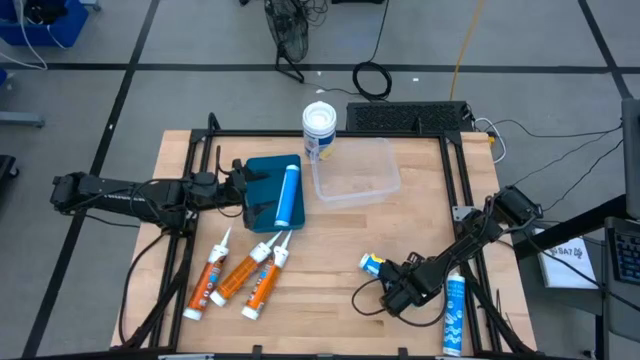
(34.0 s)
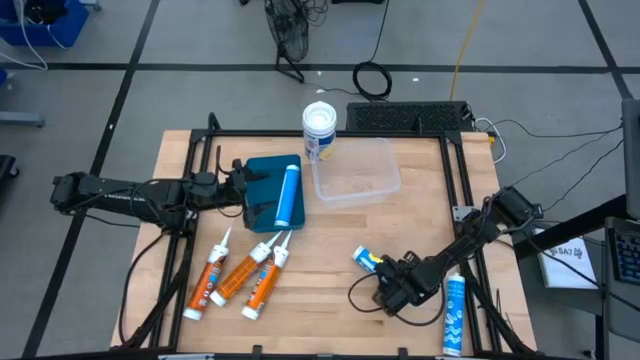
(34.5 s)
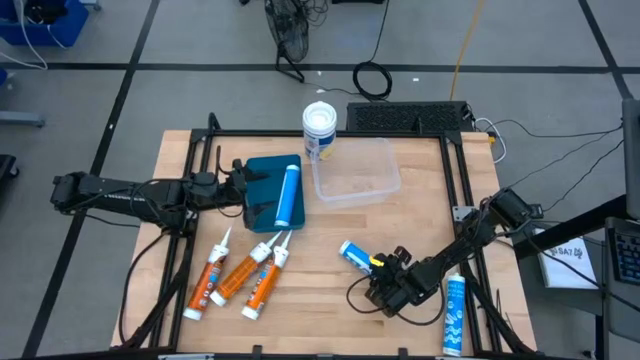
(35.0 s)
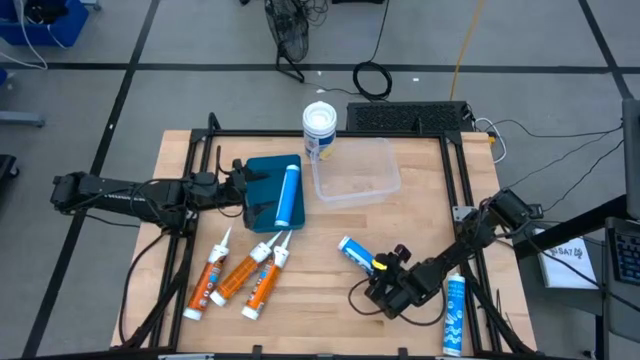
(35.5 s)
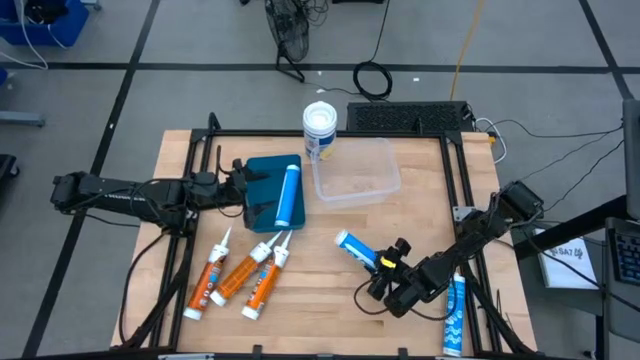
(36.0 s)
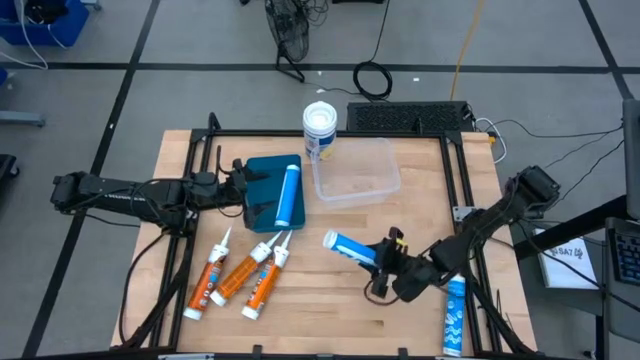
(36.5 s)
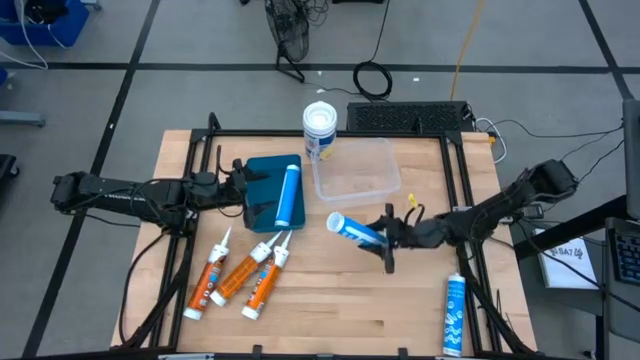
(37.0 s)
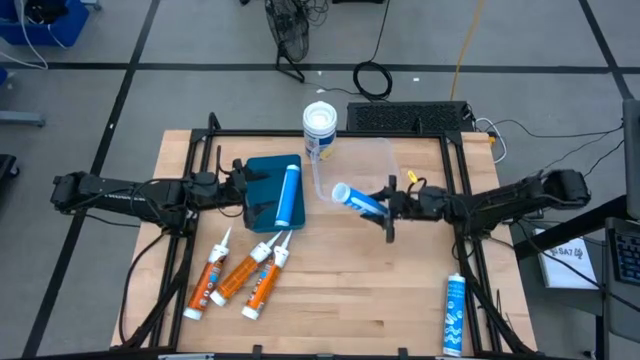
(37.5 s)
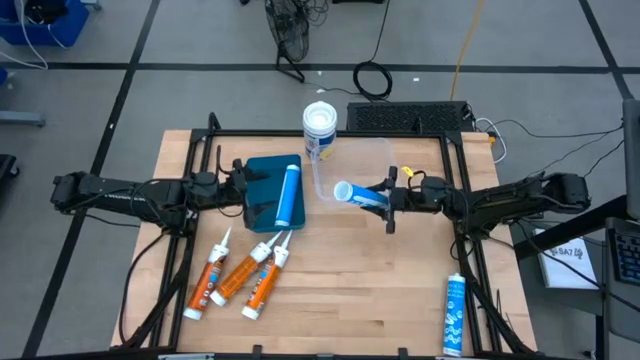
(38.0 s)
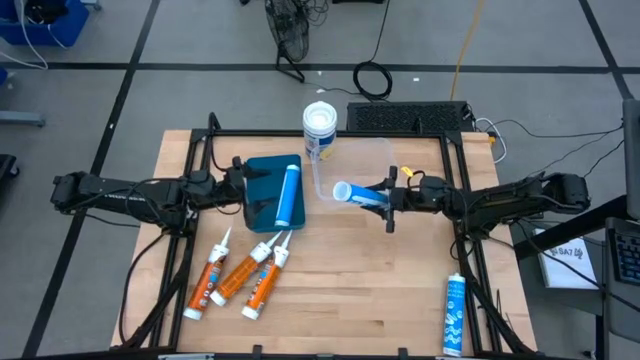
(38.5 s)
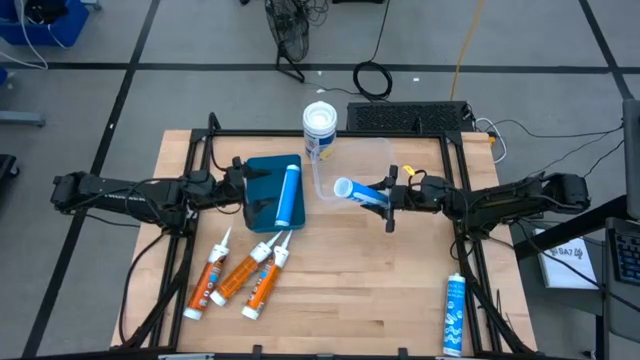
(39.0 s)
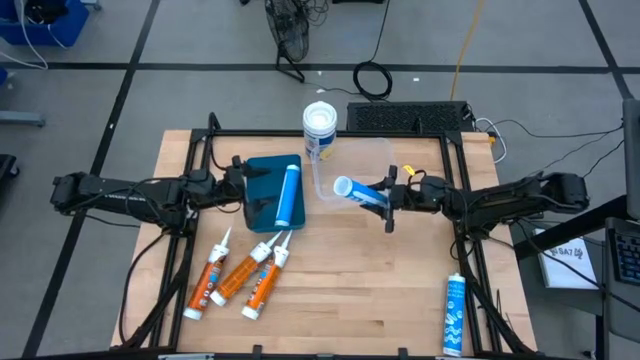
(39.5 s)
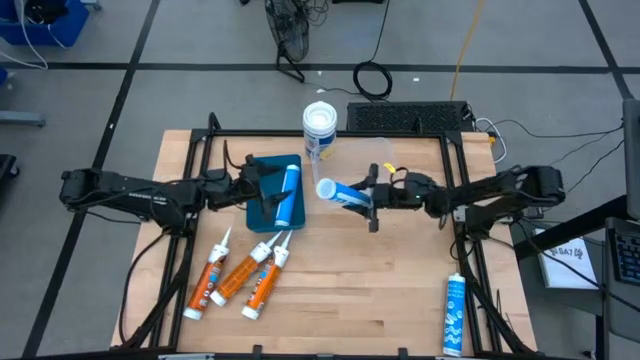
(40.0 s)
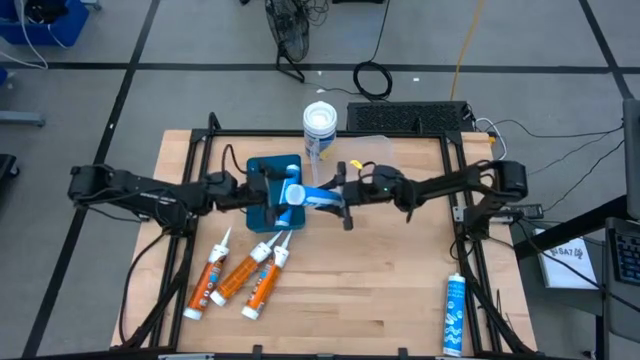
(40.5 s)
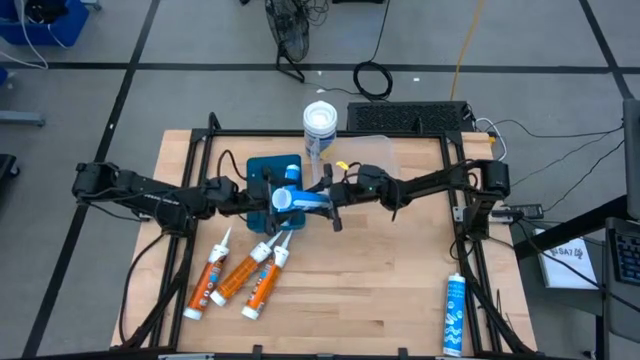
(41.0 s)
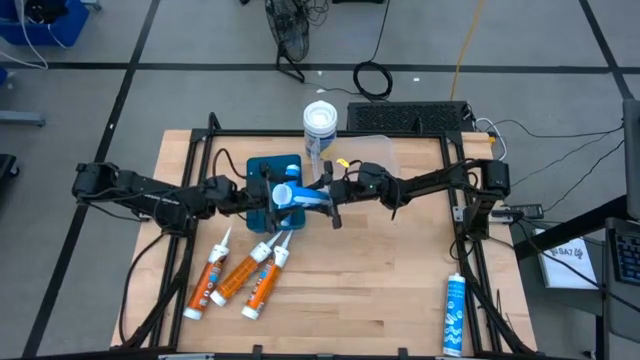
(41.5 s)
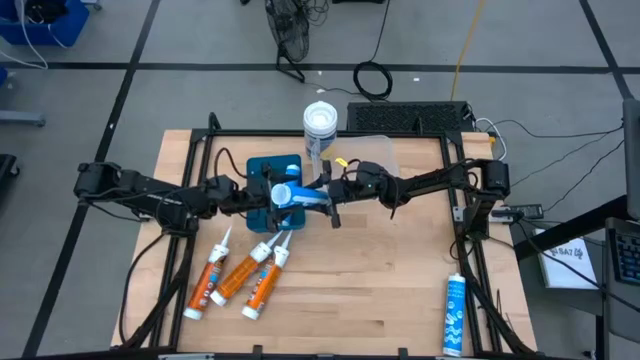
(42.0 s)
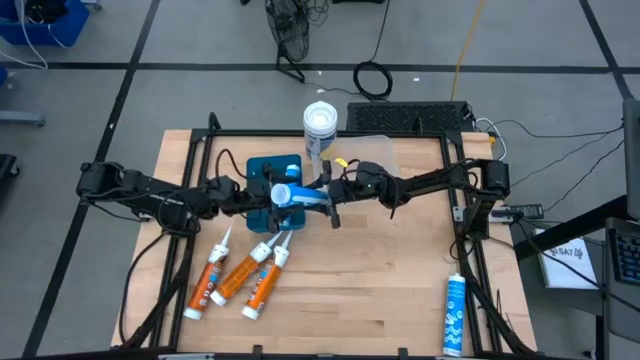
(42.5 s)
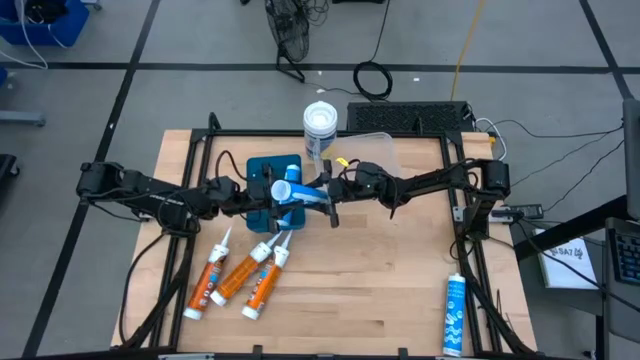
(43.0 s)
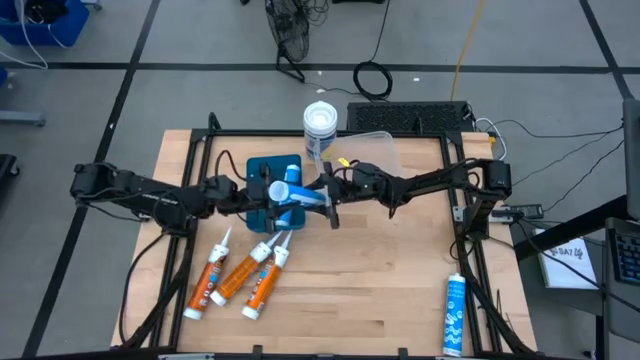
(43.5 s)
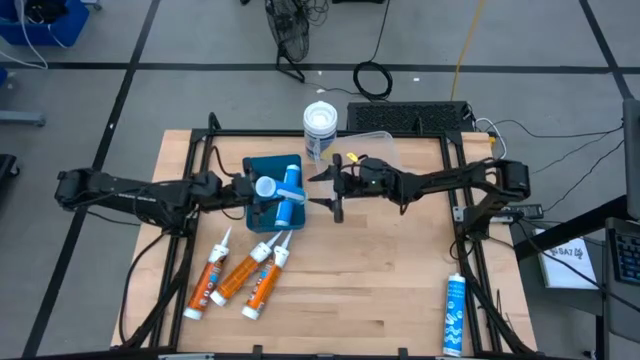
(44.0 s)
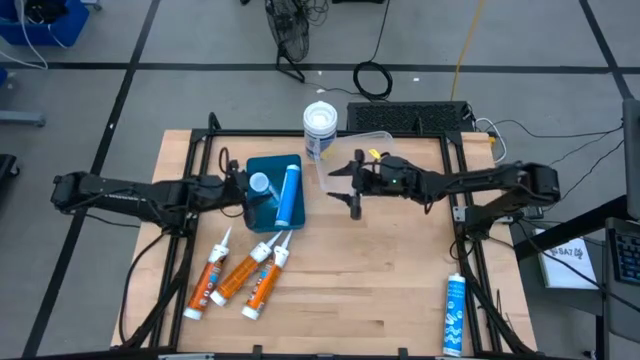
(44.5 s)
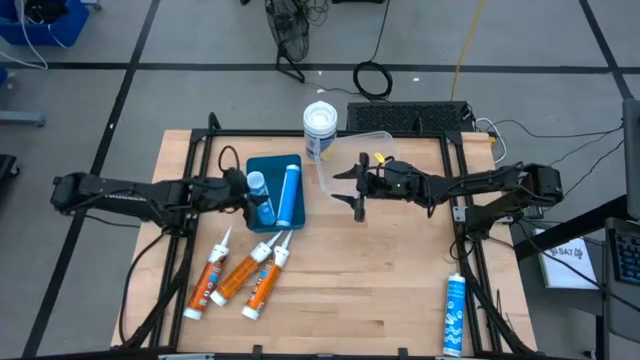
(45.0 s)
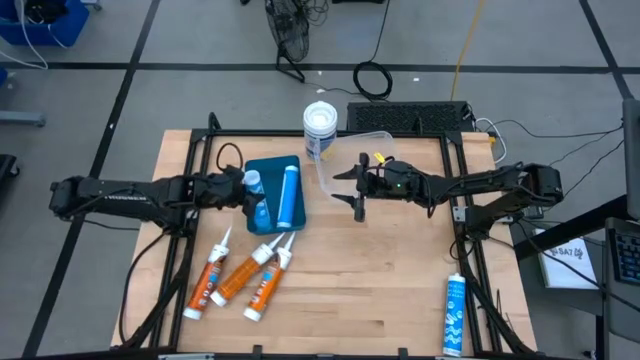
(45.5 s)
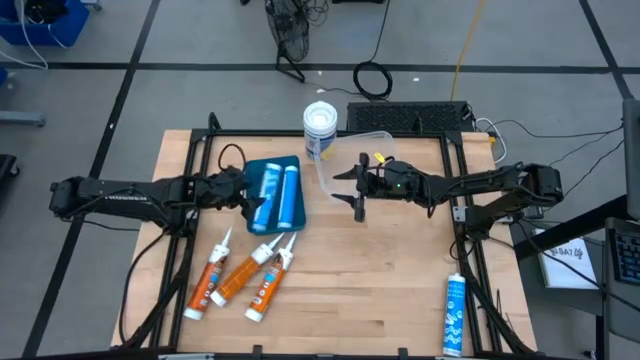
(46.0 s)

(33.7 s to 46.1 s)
Task: Pick & place silicon tubes, Sealant and Lysol wipes
Put the blue caulk tube into the blue bin

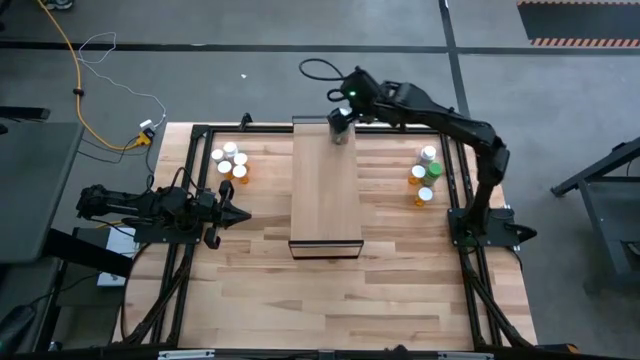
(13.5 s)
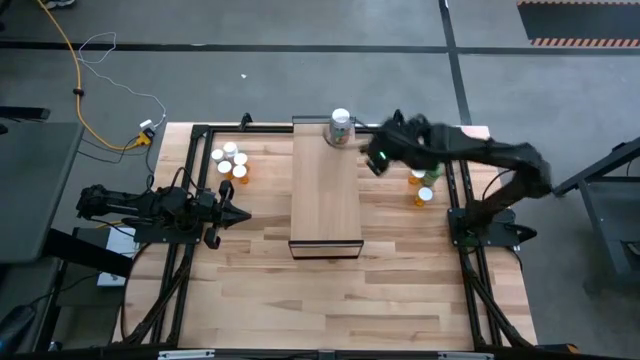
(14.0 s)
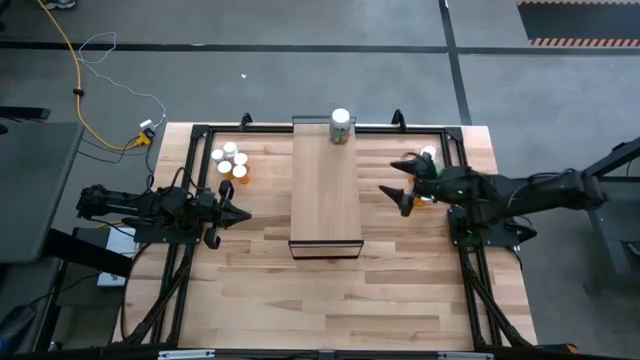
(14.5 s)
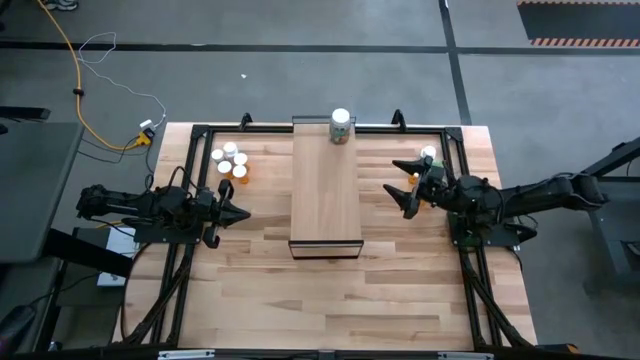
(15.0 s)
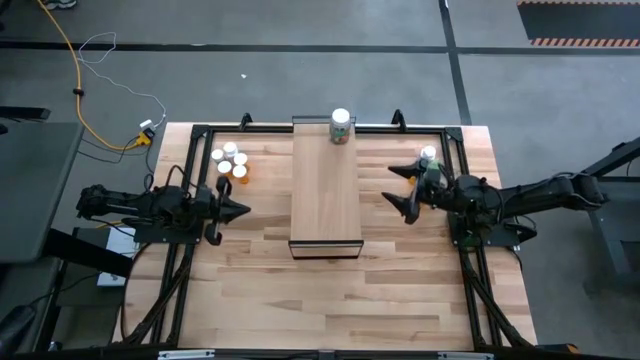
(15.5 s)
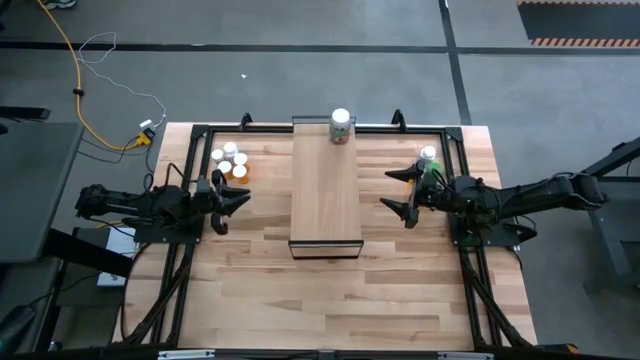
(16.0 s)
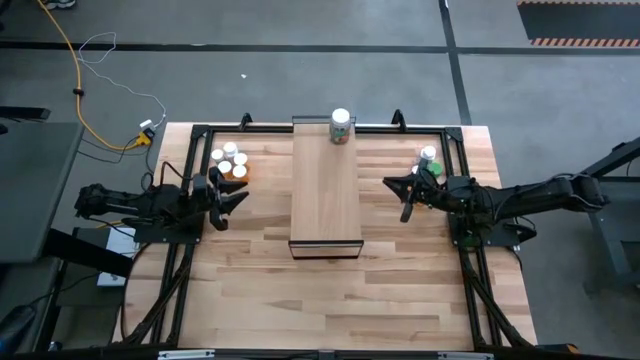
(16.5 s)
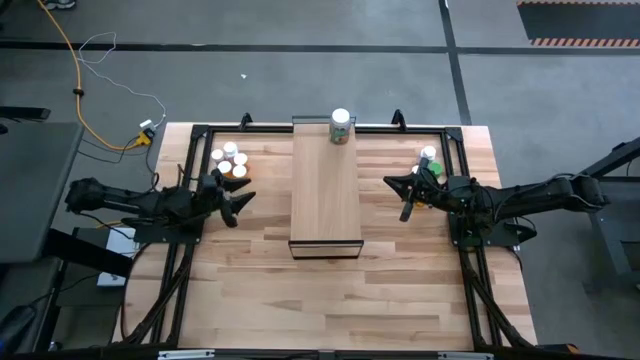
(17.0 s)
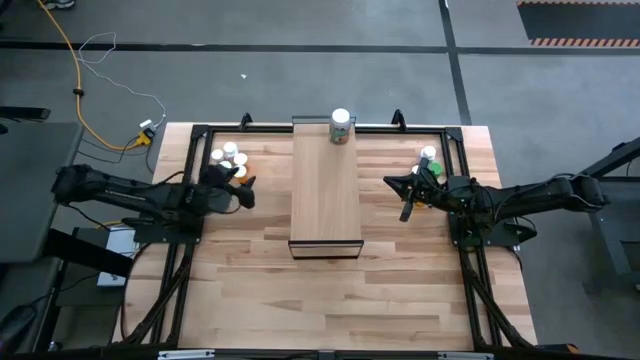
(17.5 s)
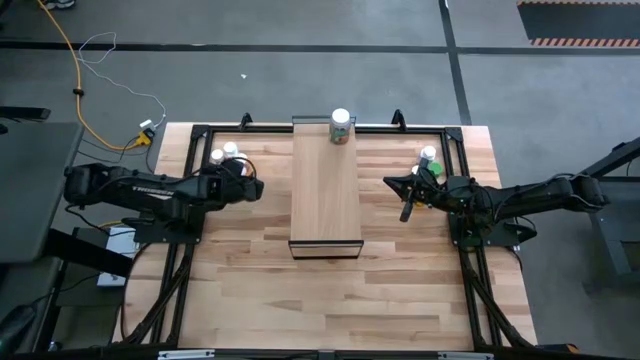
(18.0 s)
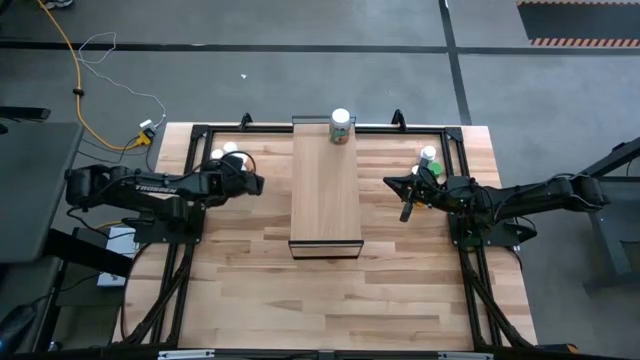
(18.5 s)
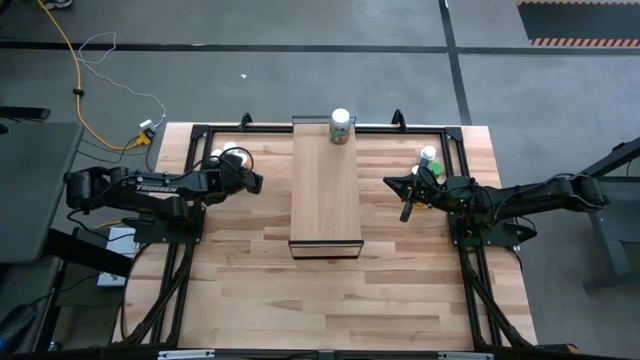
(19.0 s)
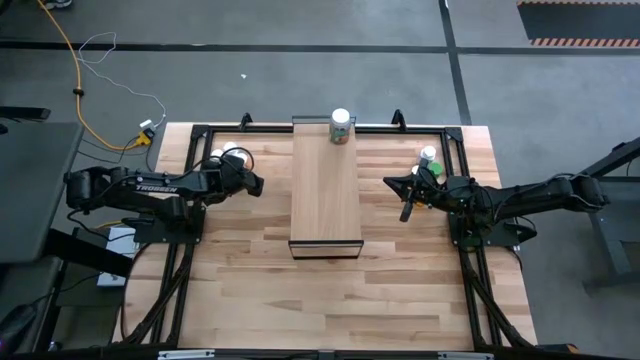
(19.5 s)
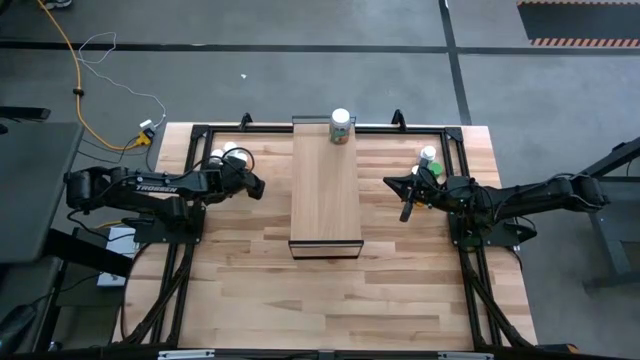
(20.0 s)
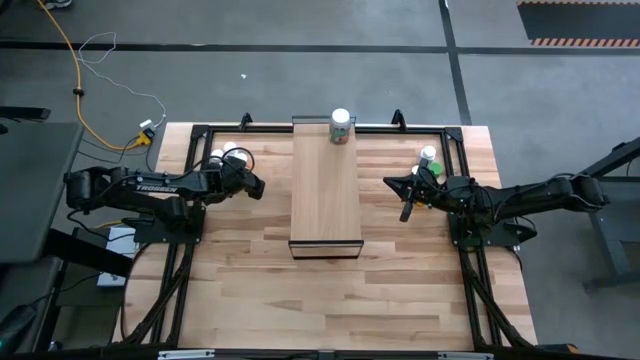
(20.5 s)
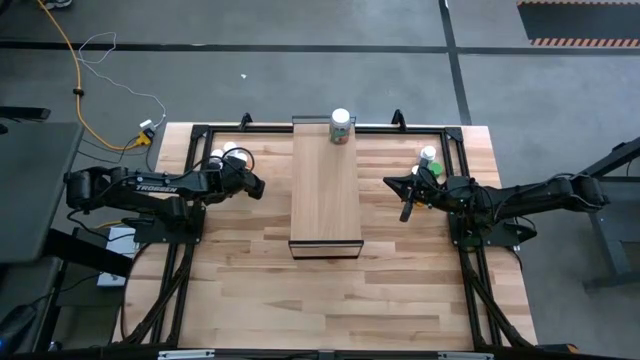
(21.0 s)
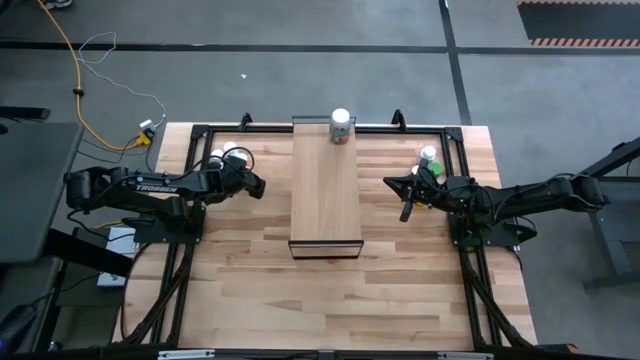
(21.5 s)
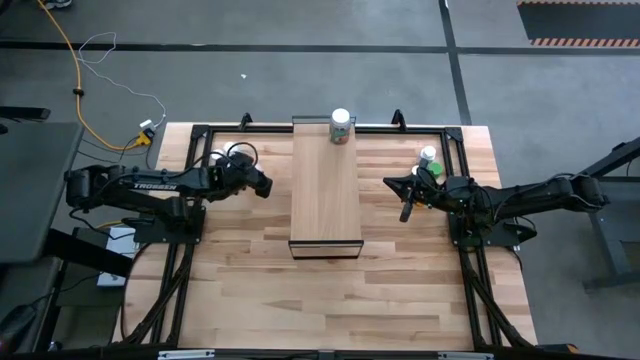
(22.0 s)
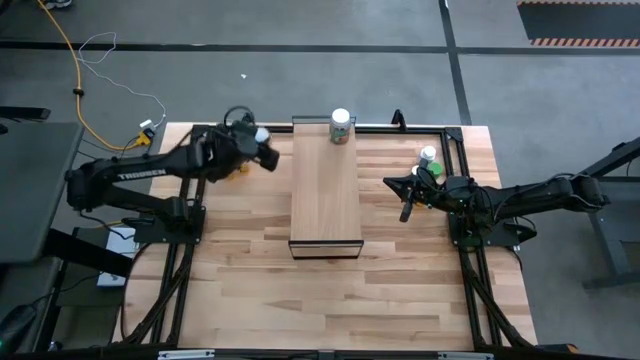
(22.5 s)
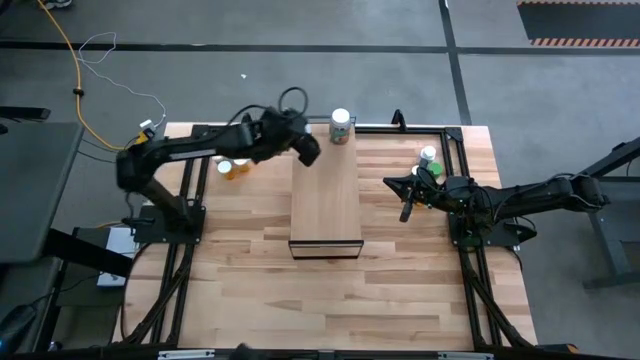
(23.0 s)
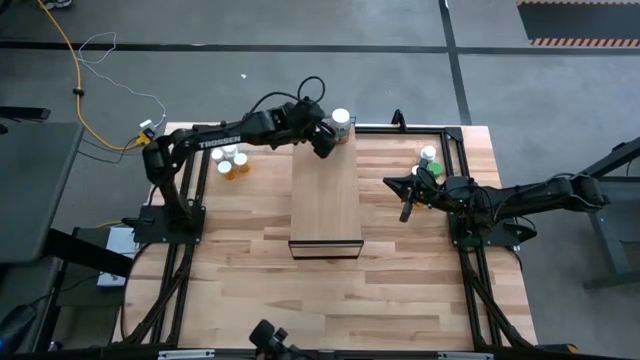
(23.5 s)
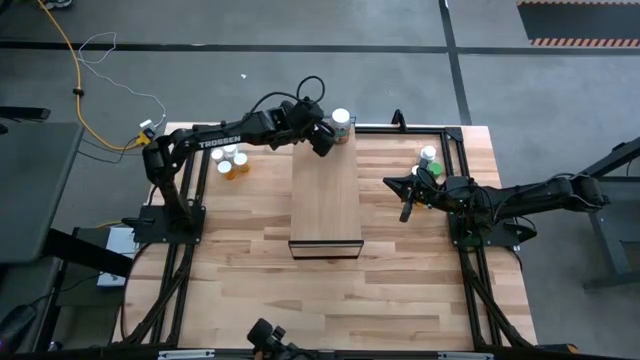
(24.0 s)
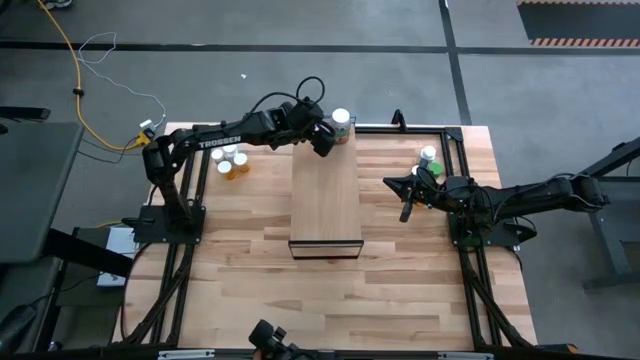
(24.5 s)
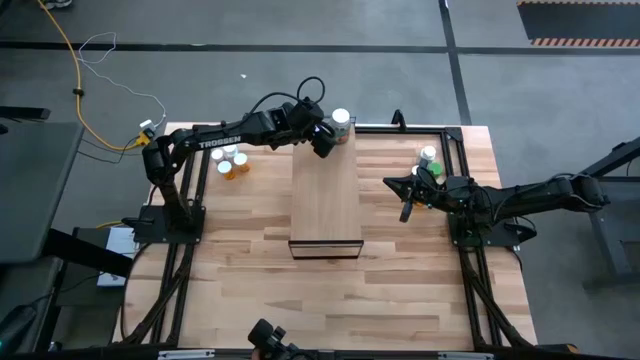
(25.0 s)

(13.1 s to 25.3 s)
Task: Pick and place medicine bottles onto shelf by color
Put the bottom left yellow pill bottle on the shelf
